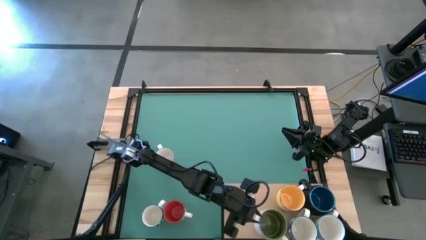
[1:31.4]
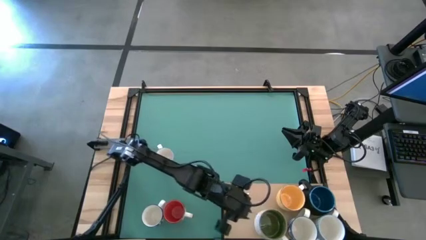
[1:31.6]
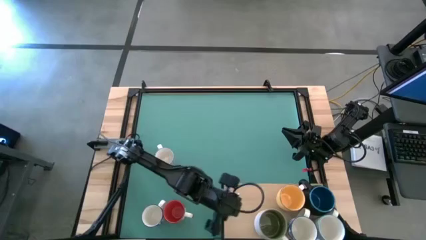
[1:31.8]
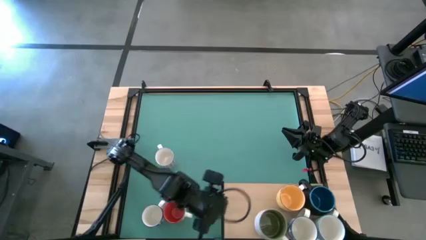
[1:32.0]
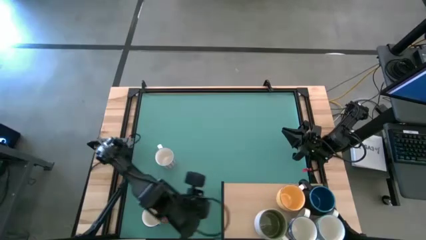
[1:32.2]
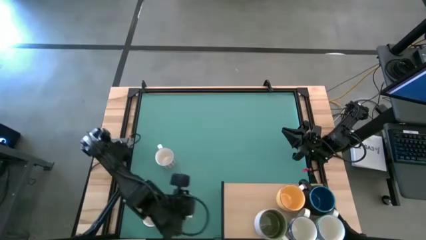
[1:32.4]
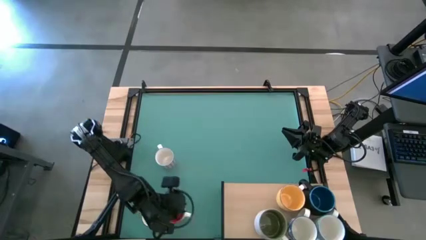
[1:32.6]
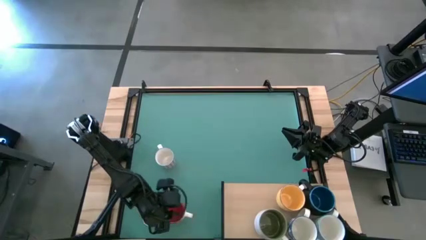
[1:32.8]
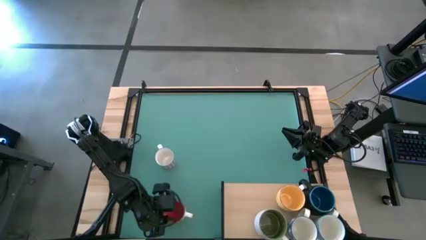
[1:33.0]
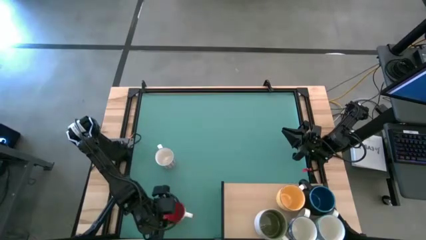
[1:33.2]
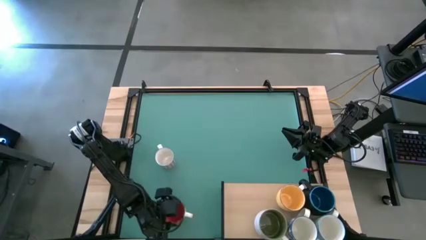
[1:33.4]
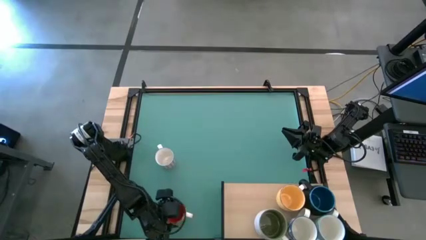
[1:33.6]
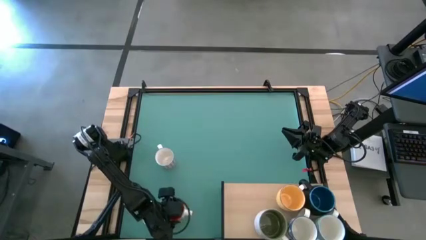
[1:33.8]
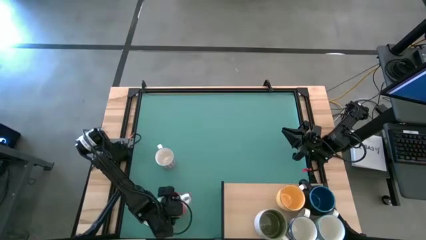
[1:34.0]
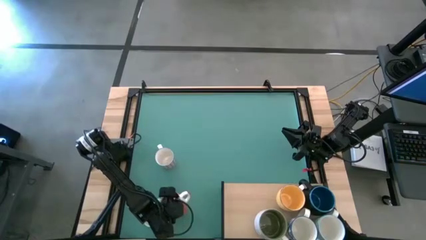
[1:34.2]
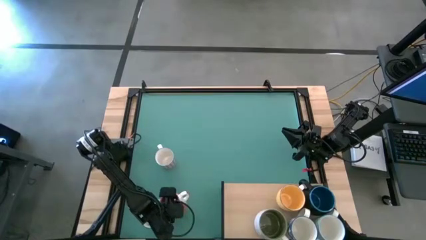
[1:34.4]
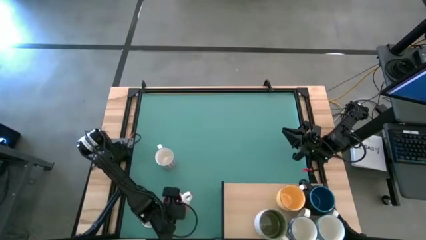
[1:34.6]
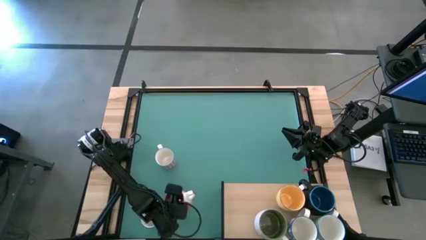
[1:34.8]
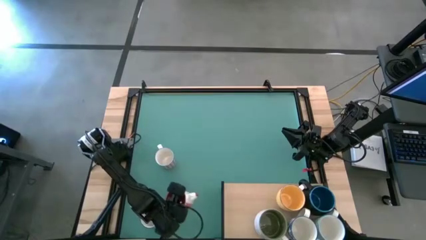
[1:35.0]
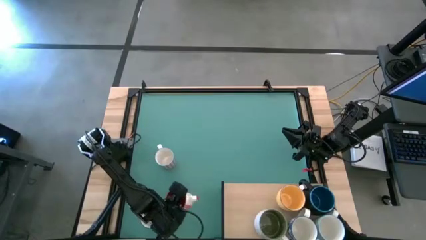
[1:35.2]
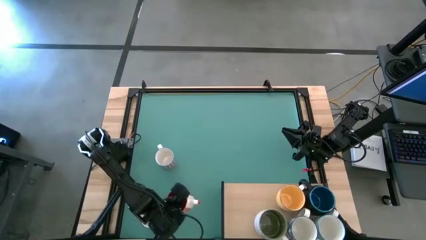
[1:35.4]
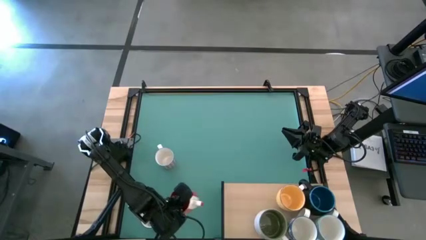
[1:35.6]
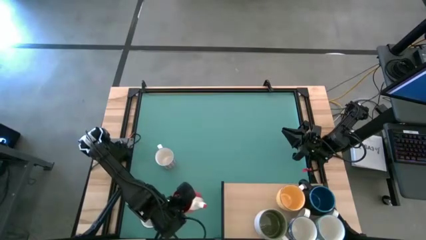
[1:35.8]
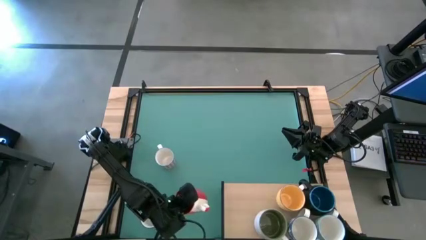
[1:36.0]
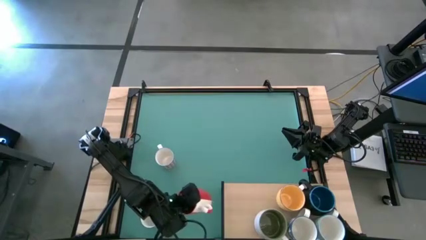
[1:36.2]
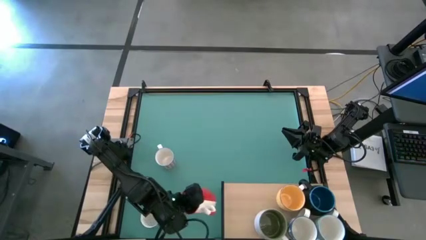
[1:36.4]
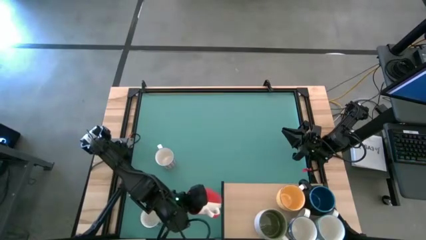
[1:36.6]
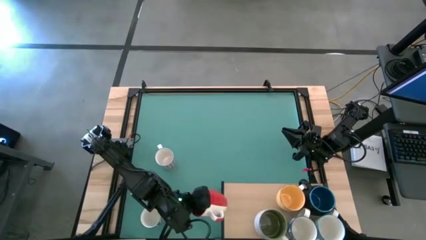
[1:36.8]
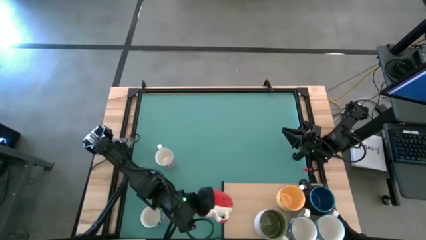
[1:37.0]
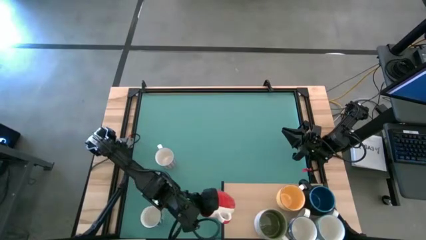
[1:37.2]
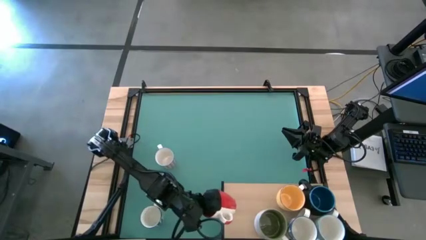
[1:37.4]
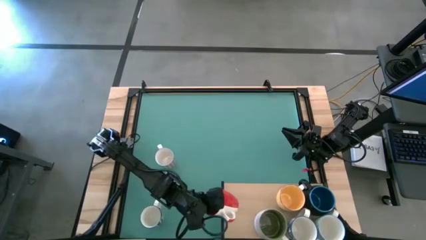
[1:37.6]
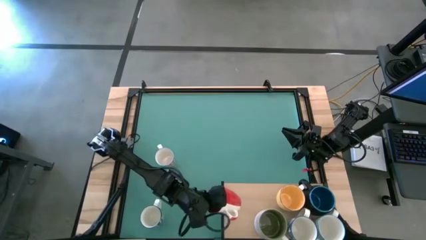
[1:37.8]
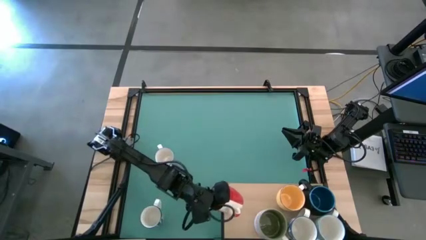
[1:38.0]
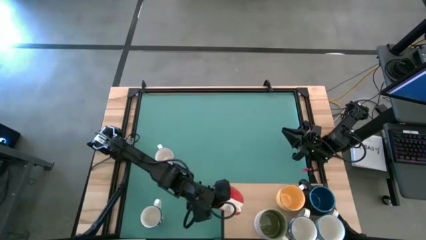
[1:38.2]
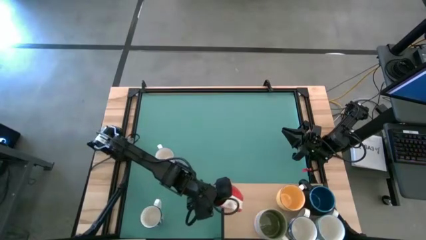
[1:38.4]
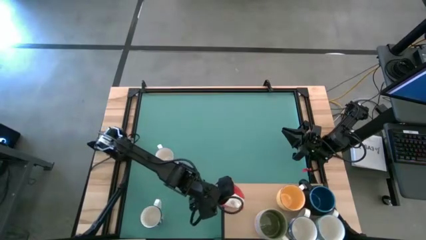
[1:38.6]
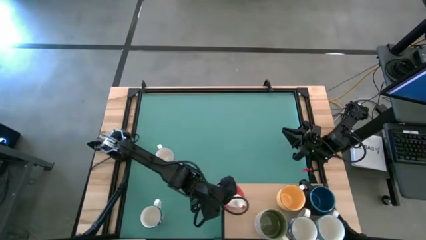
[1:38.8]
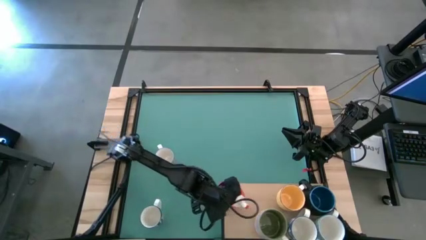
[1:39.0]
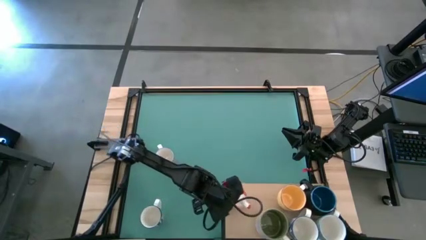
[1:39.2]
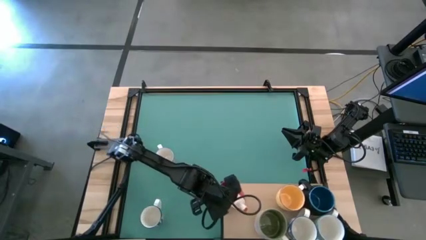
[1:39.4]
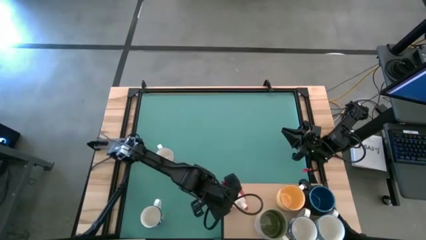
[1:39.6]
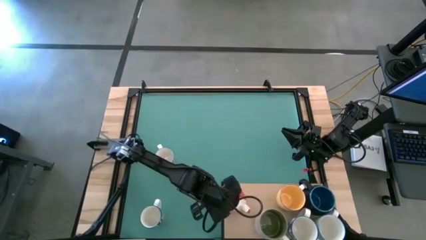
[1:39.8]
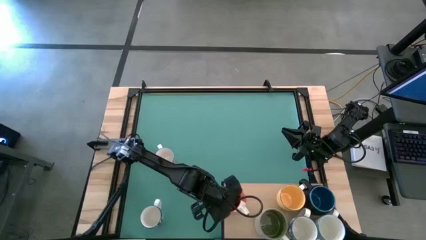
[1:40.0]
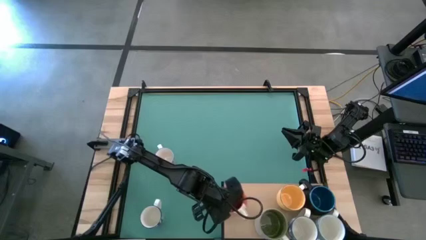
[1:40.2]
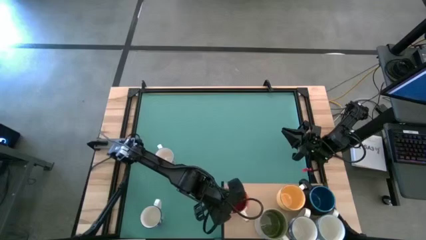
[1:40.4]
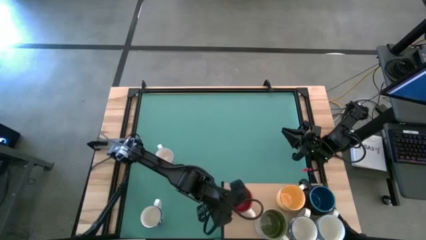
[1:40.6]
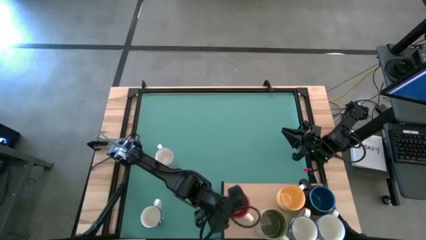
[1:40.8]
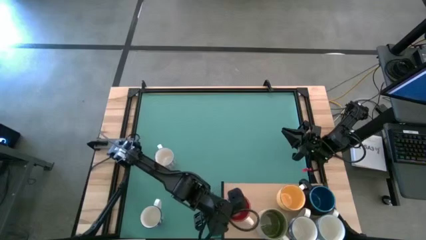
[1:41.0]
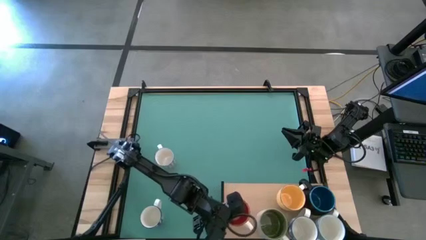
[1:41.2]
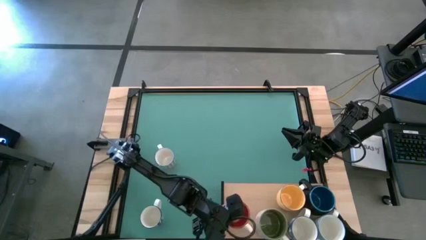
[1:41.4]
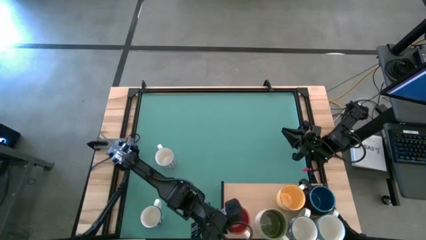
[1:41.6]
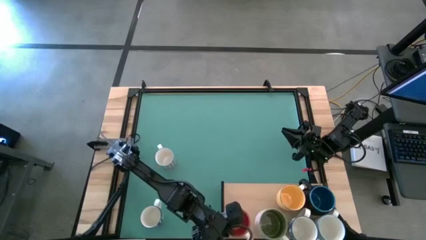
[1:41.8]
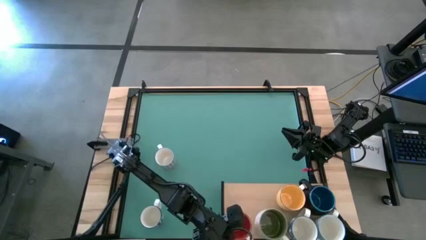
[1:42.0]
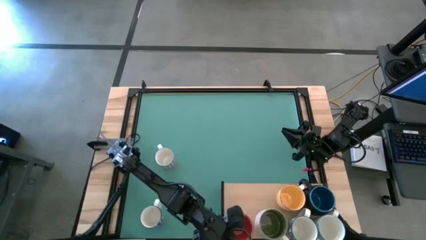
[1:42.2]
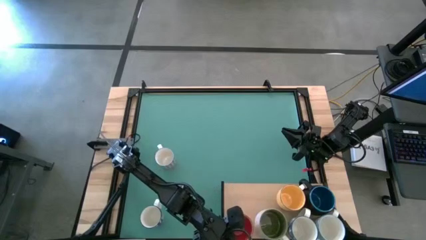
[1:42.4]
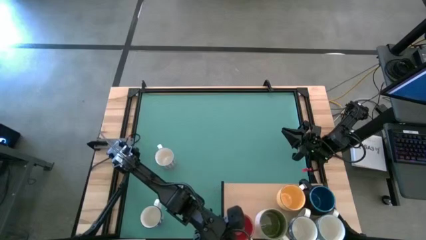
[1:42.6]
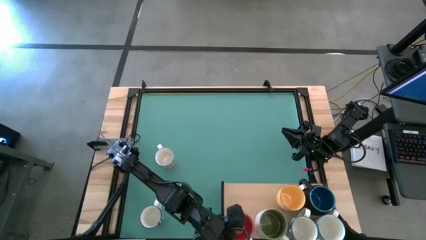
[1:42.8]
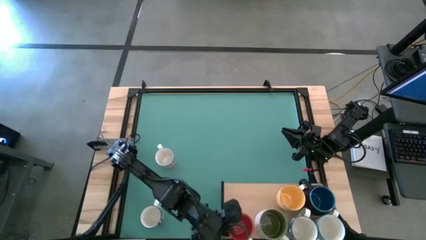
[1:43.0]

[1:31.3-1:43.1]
Task: Place coffee mugs
Put the red mug on the shelf
